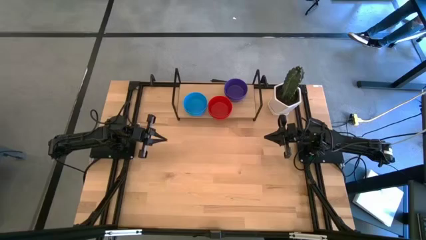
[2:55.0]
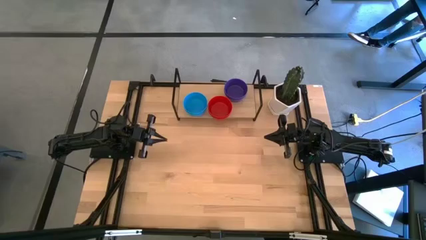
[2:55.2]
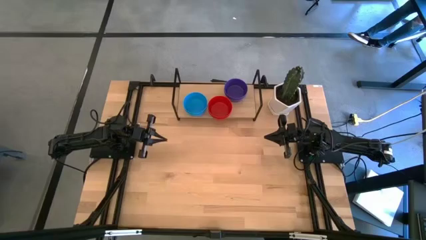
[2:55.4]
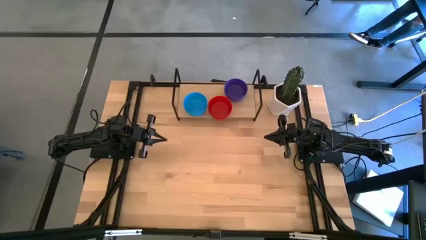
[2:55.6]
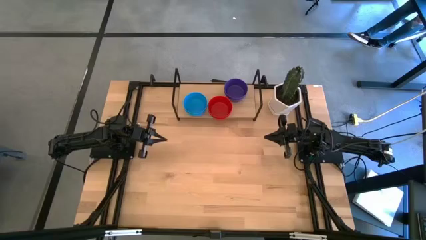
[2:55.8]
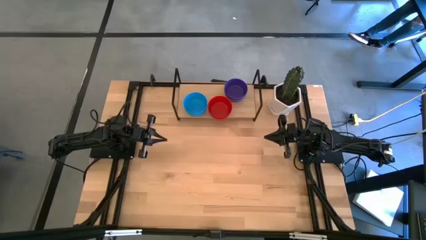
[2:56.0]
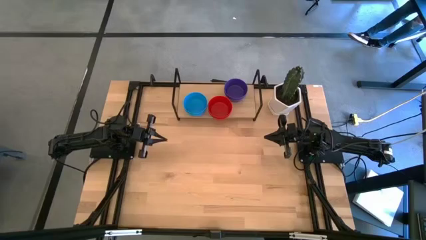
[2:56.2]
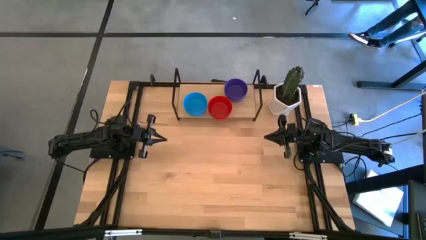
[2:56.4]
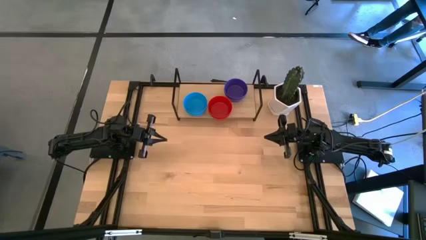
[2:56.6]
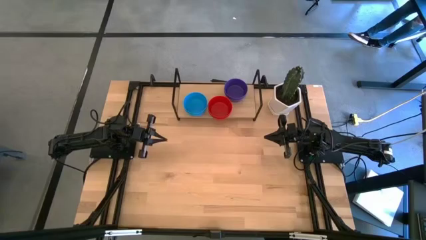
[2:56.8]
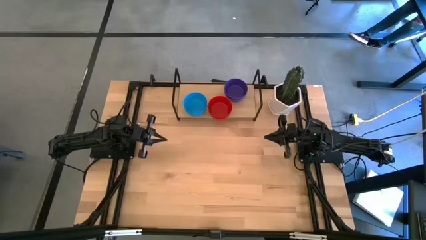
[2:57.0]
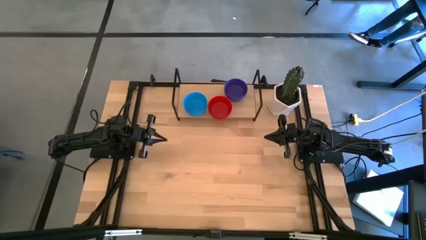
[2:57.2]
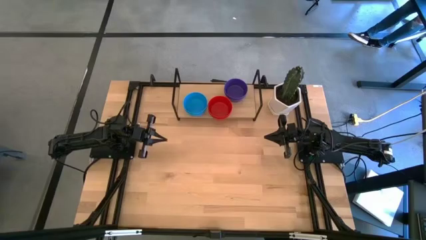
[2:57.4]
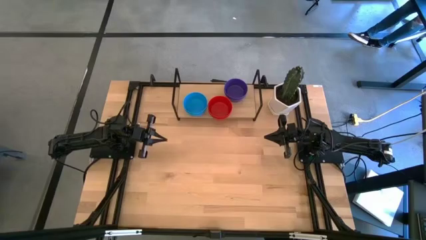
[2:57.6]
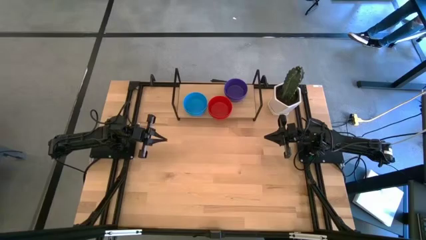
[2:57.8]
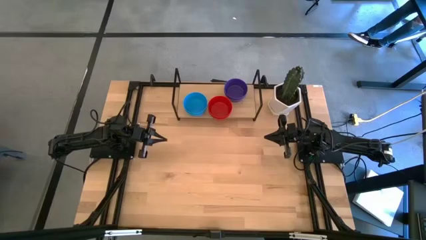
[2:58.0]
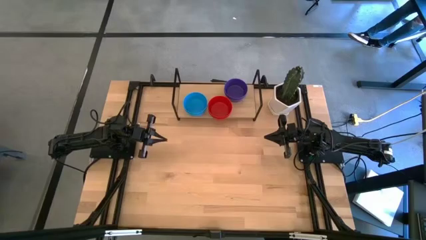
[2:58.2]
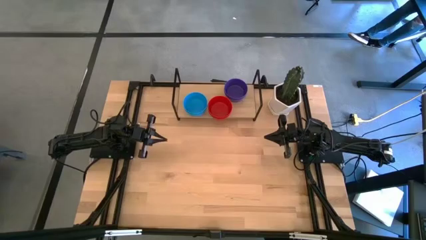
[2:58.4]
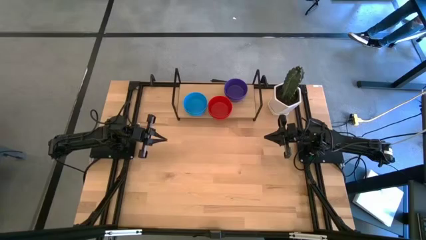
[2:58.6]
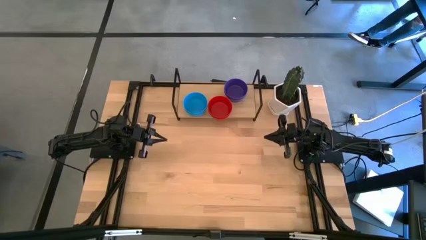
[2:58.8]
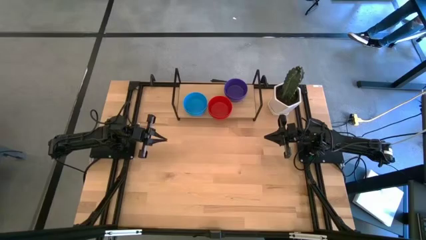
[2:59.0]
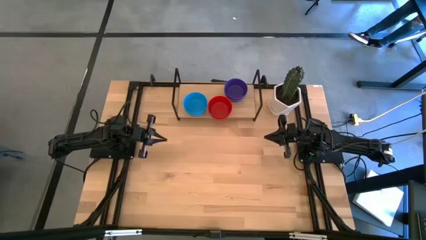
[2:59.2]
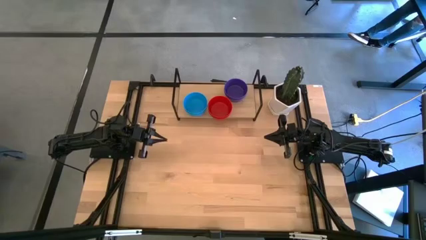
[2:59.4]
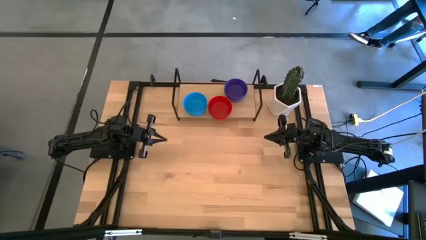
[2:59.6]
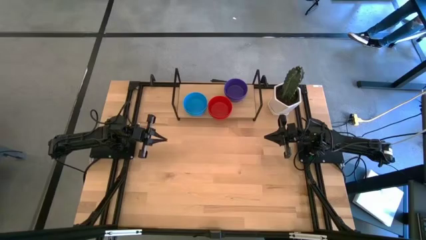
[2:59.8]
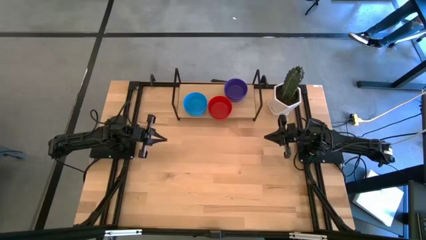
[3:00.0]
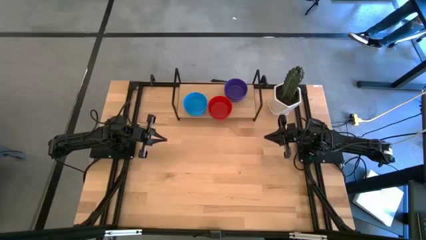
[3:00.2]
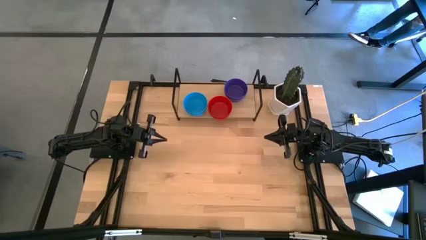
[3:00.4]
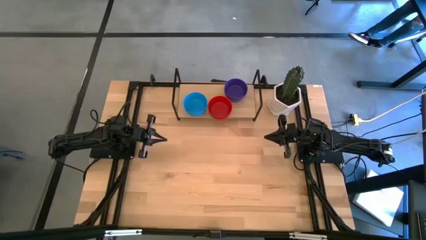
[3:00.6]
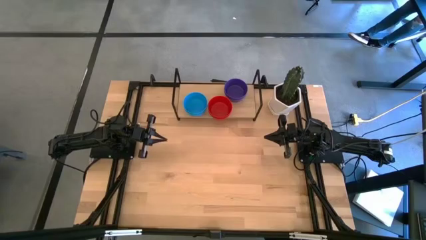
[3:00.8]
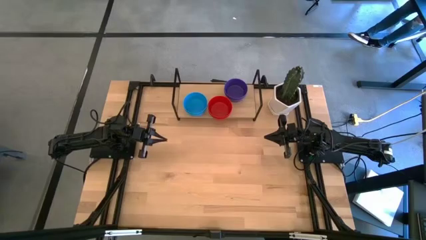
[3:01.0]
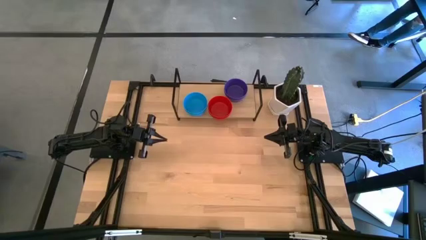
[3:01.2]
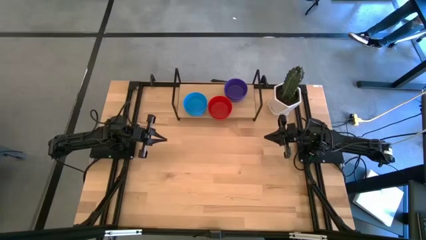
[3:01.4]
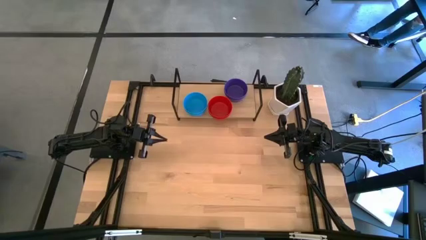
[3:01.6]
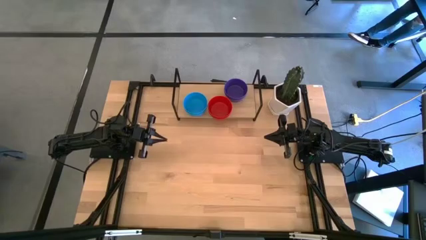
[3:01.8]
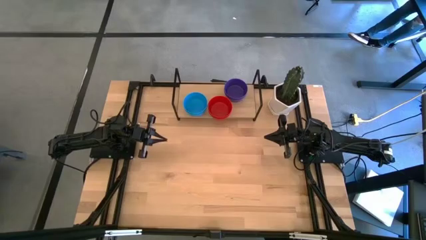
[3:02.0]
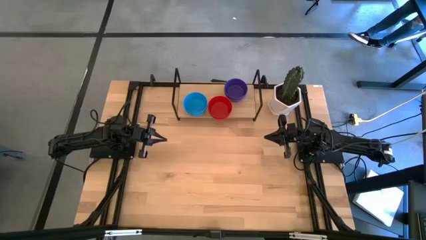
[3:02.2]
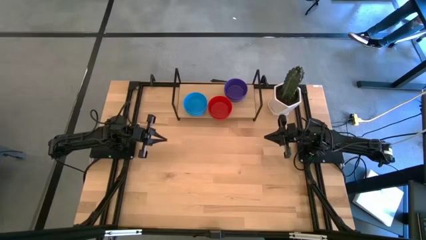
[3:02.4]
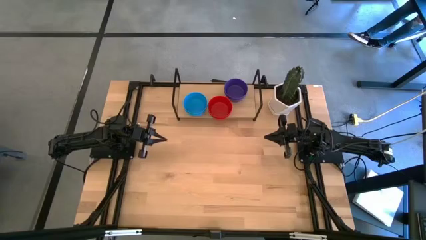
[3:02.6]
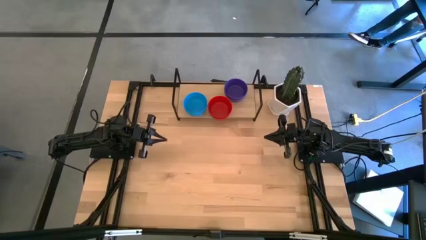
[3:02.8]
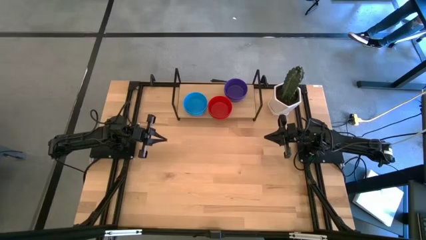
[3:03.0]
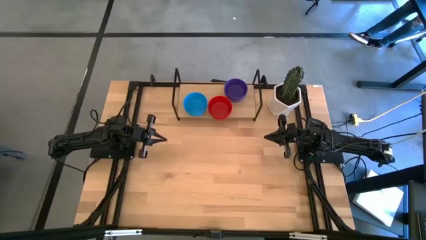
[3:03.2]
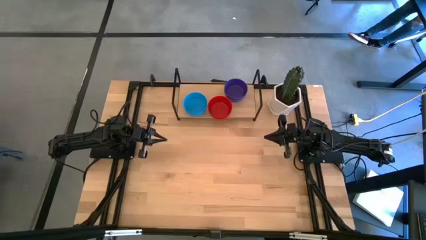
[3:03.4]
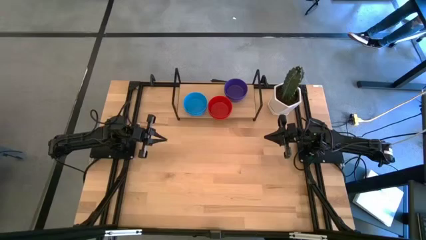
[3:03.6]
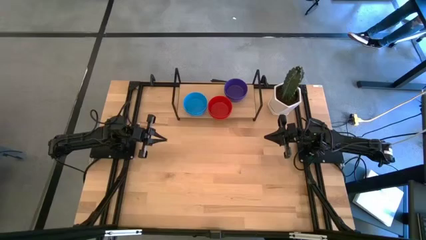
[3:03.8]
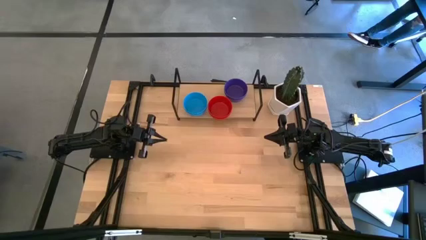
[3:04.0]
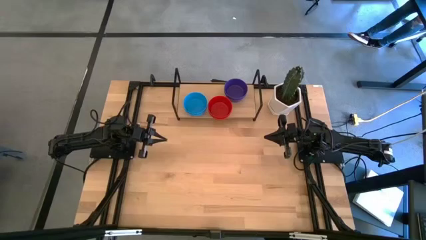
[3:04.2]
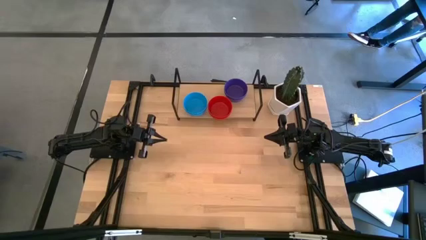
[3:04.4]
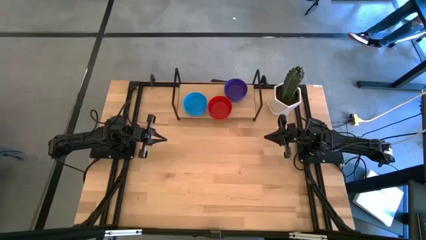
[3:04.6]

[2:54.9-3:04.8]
Task: Pick & Place Mini bowls
Return to Home Position

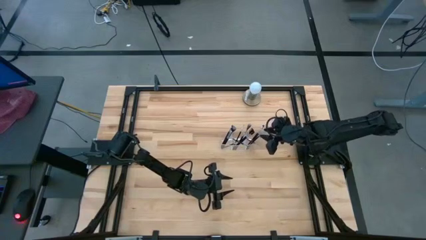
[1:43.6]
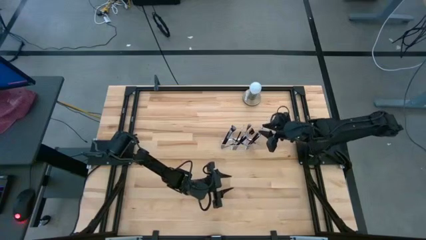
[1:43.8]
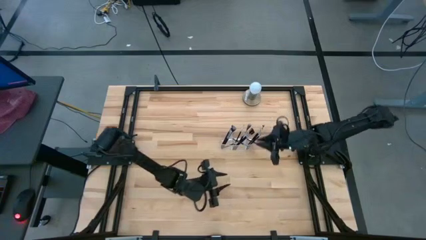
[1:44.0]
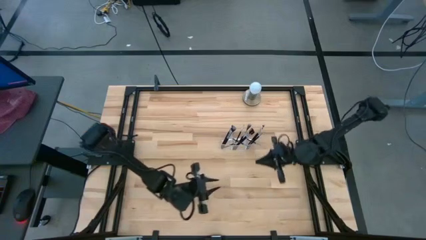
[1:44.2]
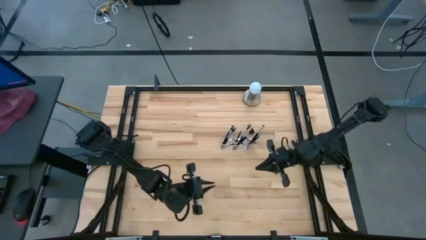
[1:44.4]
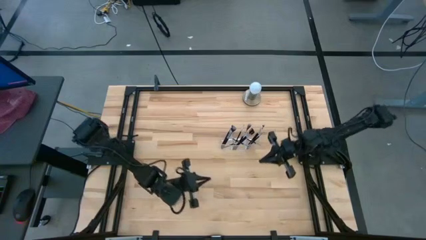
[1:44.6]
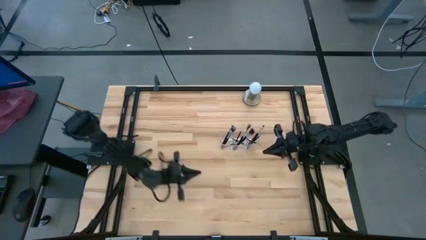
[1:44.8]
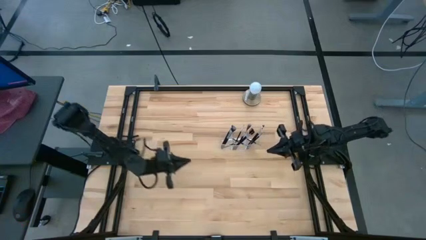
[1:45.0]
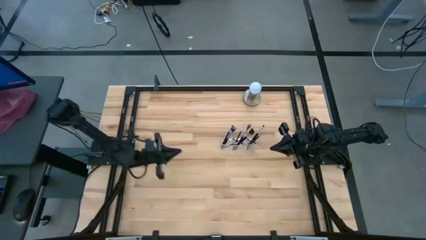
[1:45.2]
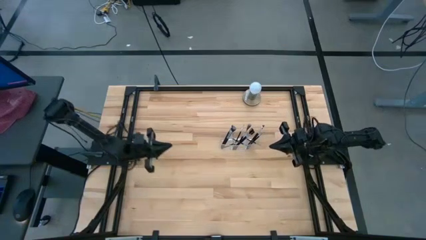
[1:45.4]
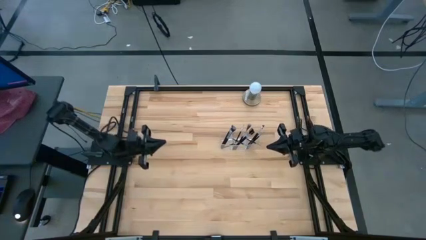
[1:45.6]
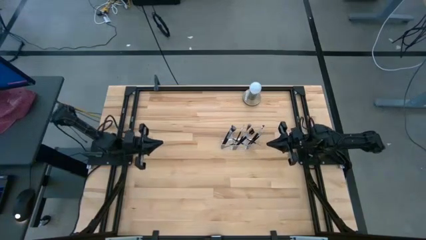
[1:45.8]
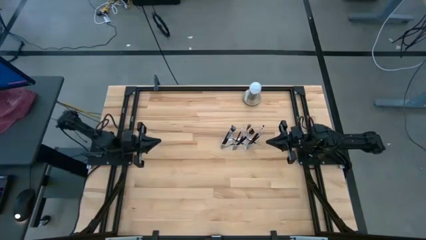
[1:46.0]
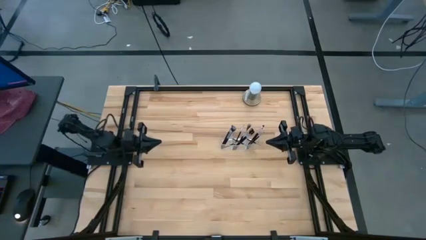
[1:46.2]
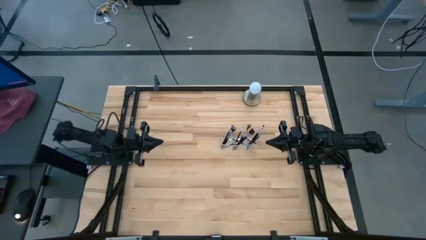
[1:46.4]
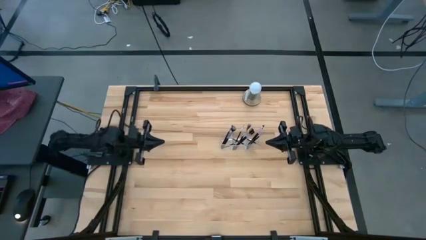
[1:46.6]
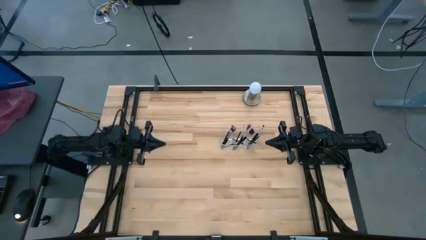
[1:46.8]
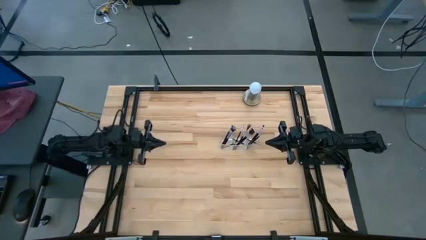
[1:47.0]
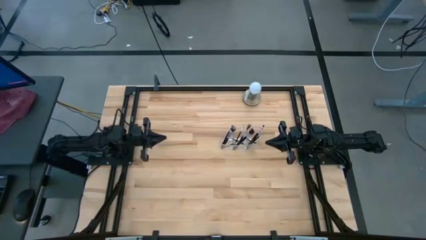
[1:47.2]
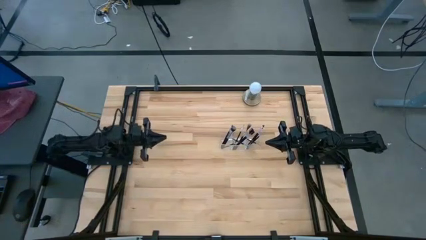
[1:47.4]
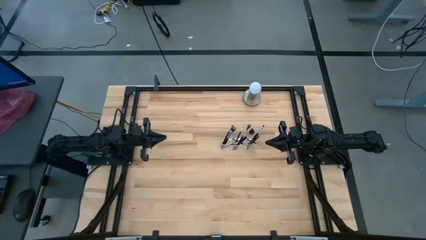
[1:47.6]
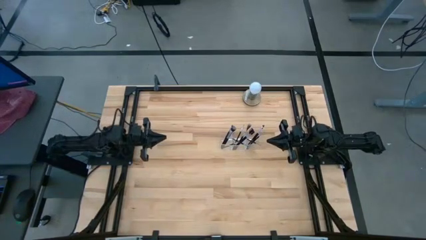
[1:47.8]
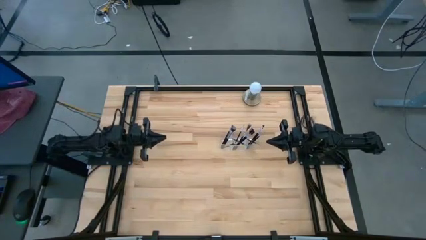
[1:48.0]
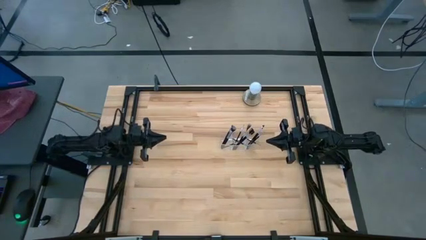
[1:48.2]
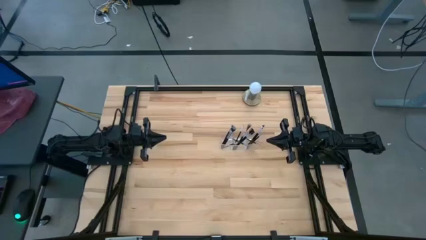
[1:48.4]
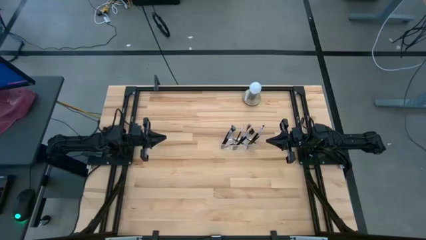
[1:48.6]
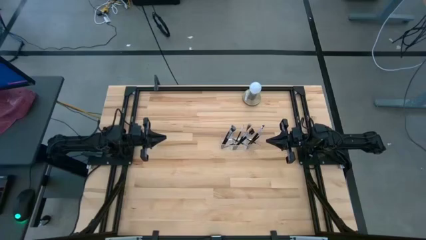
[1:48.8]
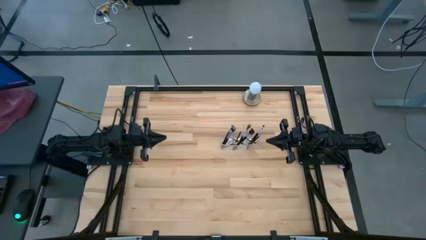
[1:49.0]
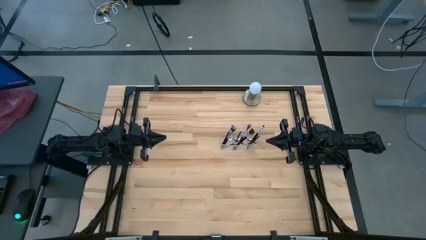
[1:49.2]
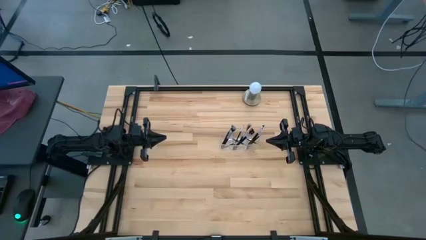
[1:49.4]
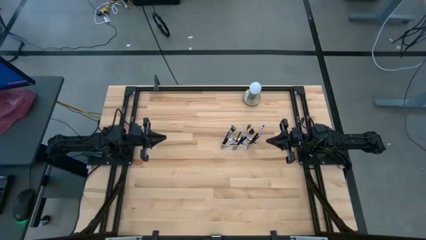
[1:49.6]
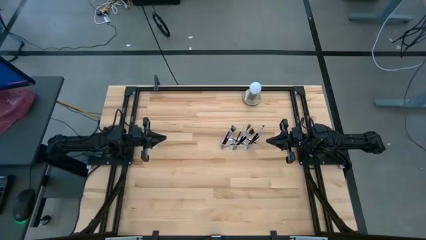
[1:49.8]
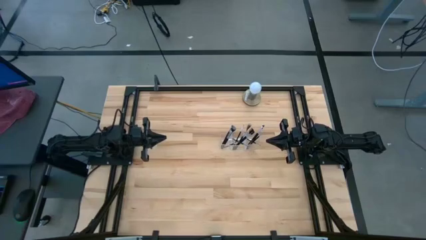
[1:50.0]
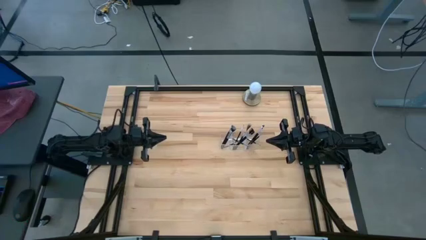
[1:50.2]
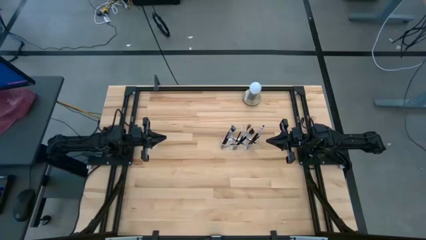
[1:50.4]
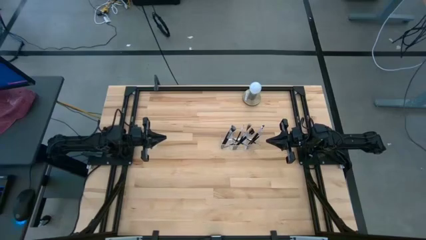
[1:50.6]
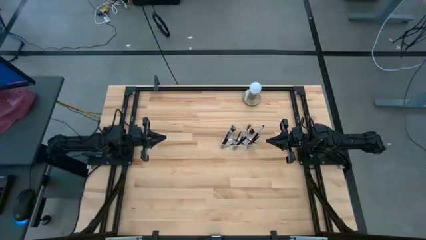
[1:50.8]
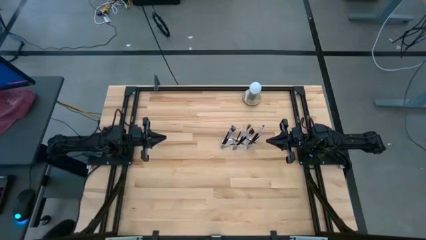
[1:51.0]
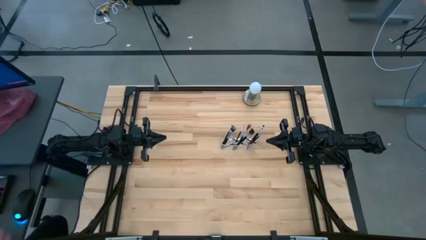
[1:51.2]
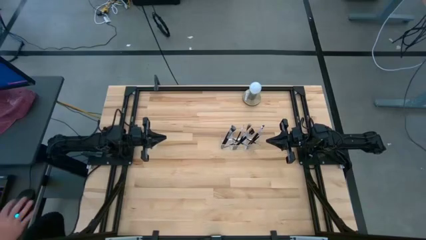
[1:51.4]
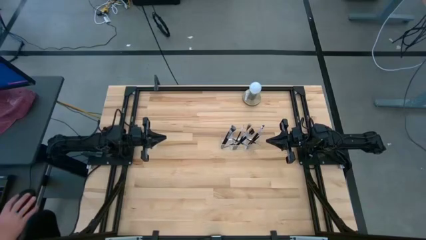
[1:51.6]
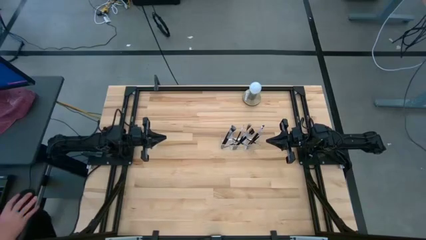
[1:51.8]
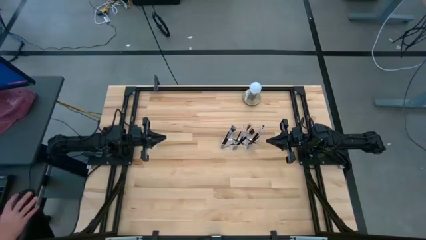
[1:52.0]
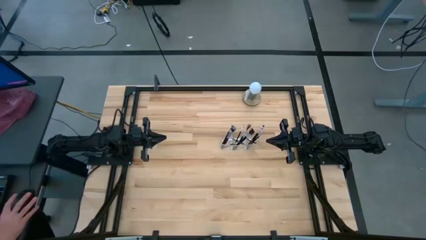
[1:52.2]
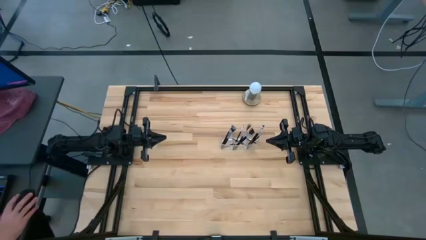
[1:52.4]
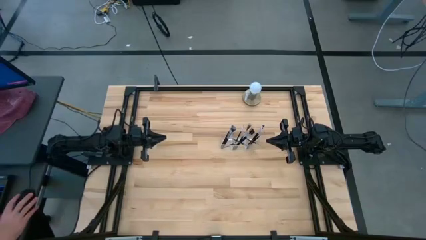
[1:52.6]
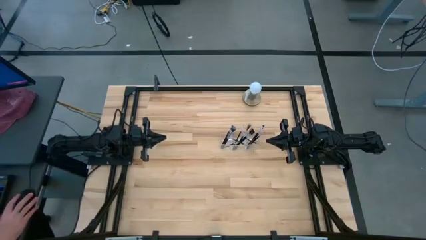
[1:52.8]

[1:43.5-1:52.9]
Task: Put items in baskets/containers
Return to Home Position
